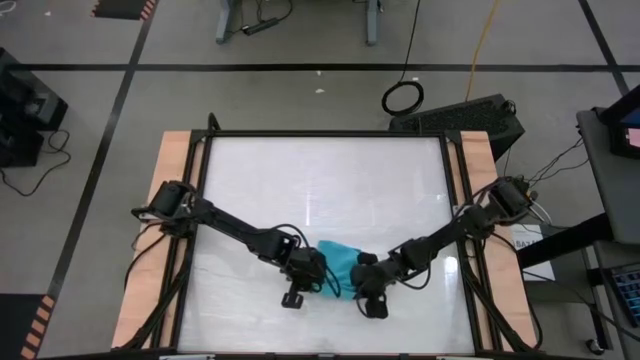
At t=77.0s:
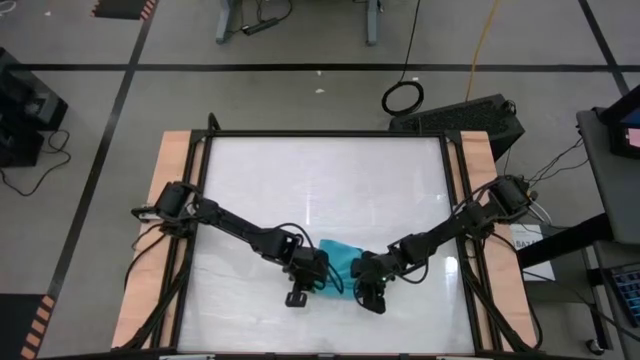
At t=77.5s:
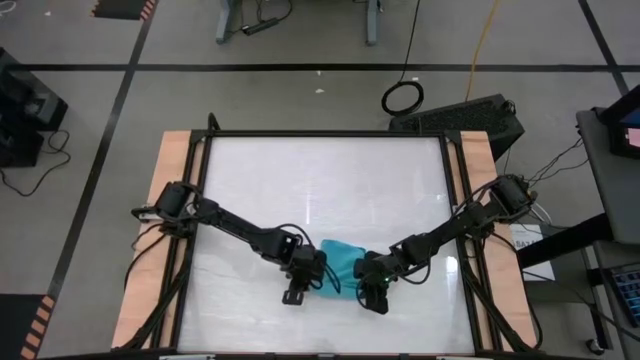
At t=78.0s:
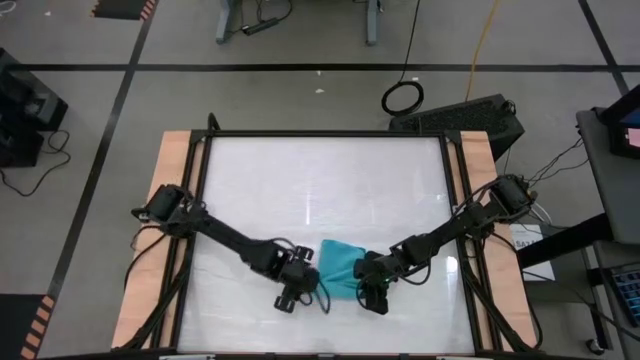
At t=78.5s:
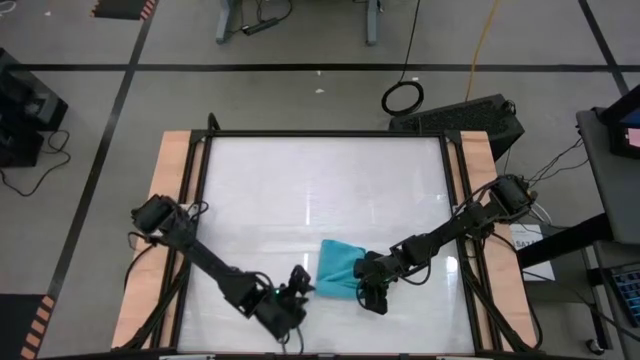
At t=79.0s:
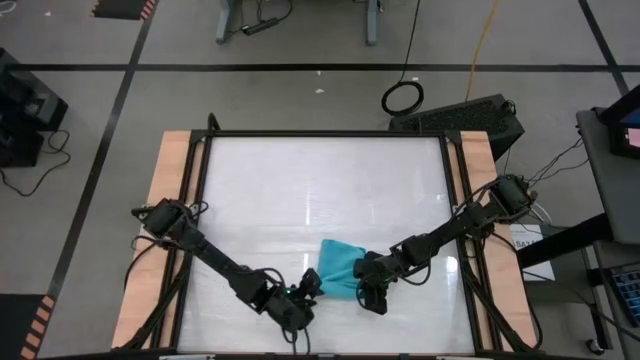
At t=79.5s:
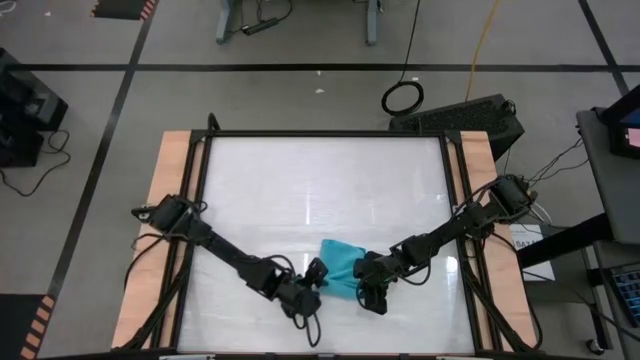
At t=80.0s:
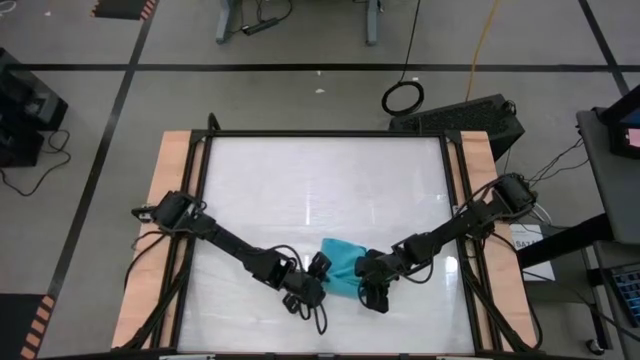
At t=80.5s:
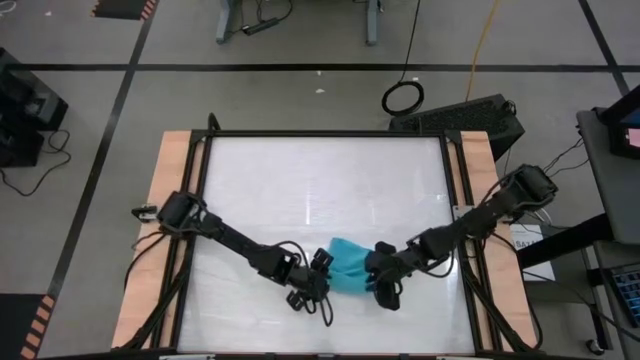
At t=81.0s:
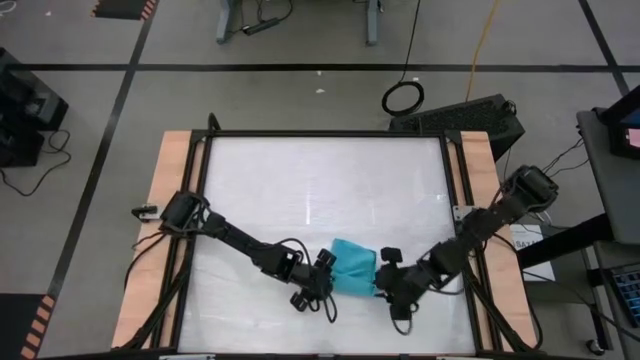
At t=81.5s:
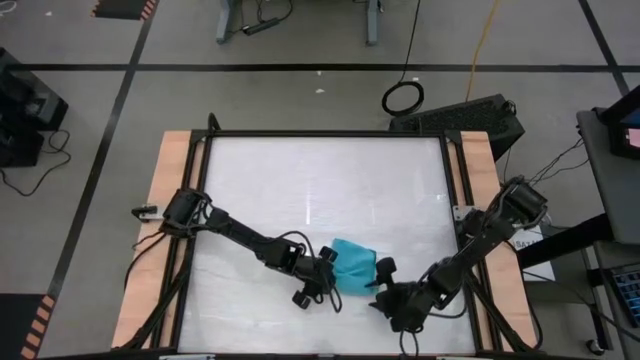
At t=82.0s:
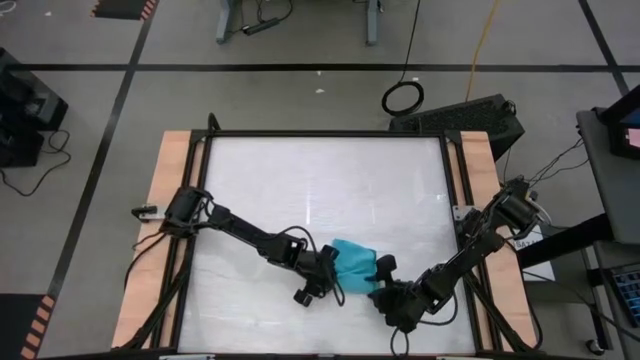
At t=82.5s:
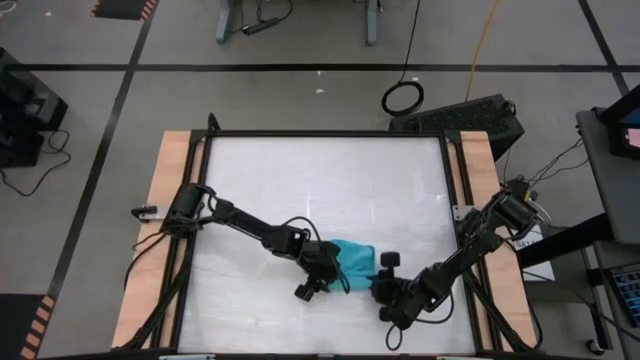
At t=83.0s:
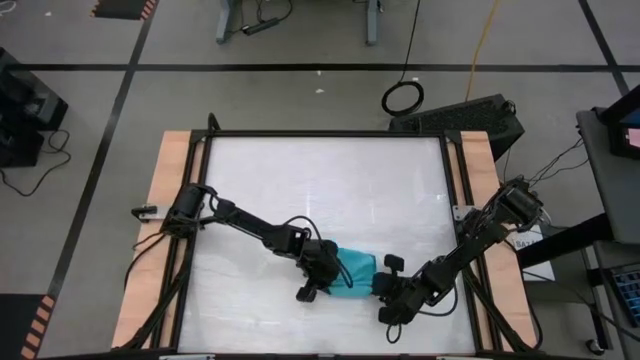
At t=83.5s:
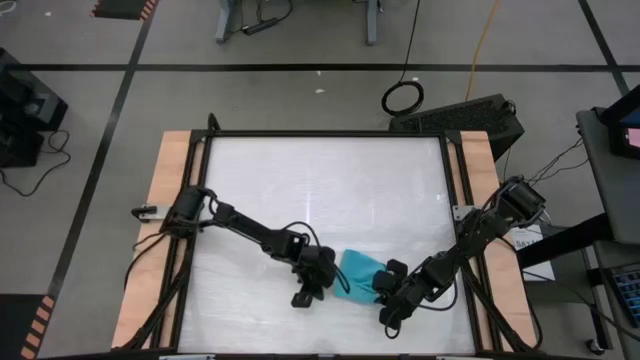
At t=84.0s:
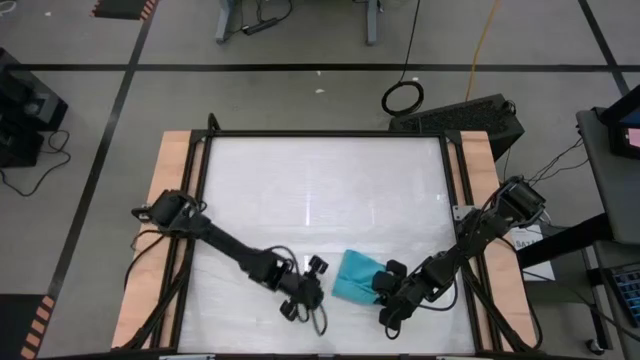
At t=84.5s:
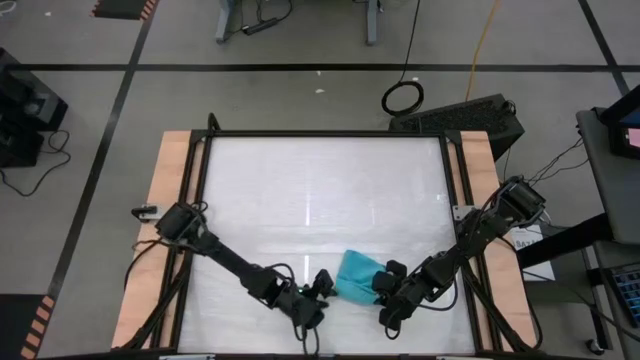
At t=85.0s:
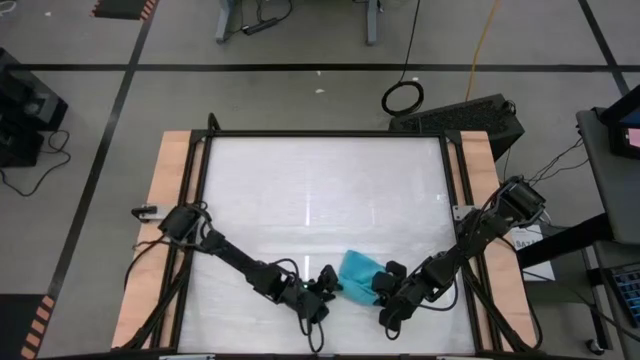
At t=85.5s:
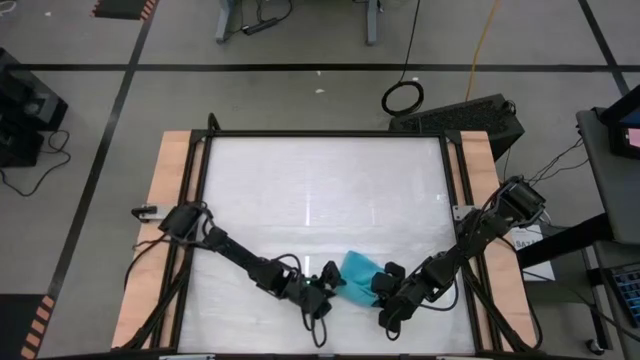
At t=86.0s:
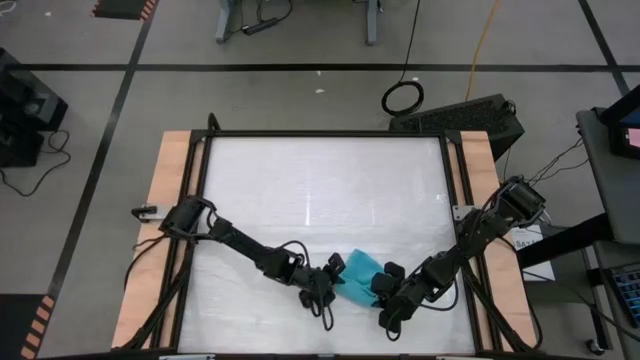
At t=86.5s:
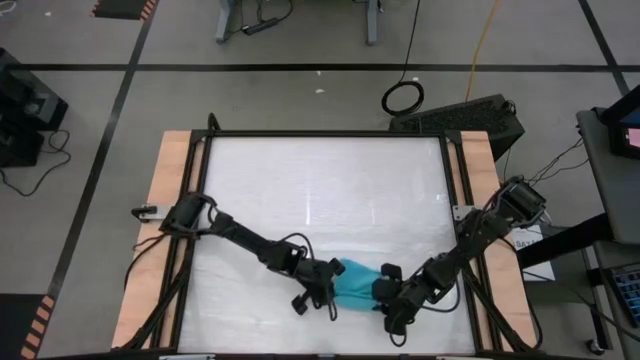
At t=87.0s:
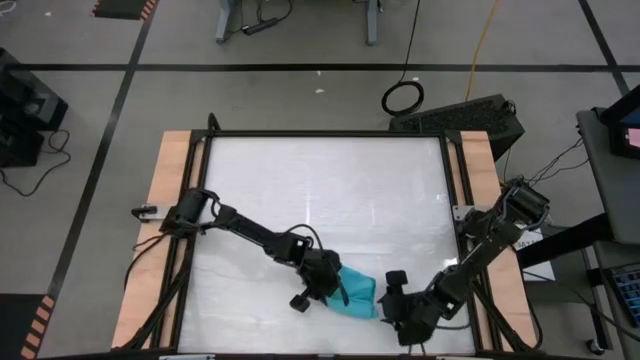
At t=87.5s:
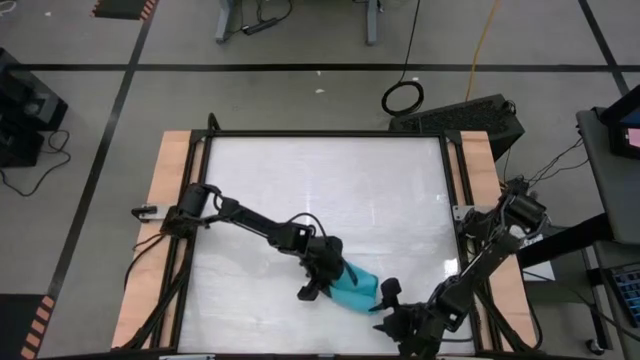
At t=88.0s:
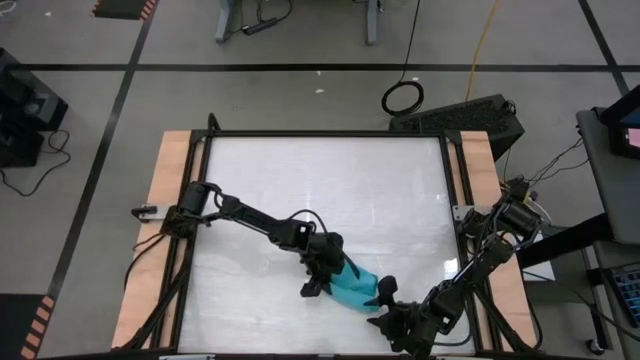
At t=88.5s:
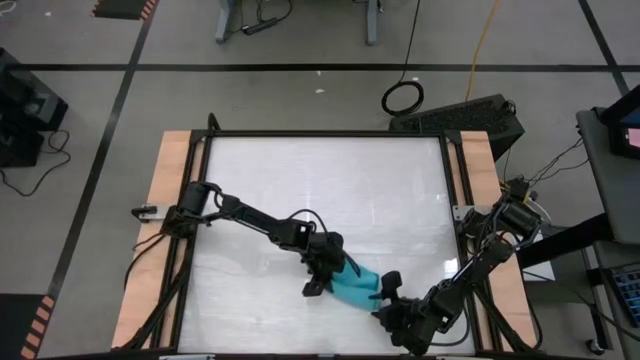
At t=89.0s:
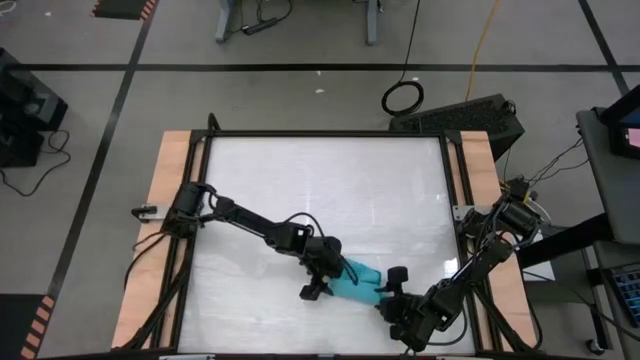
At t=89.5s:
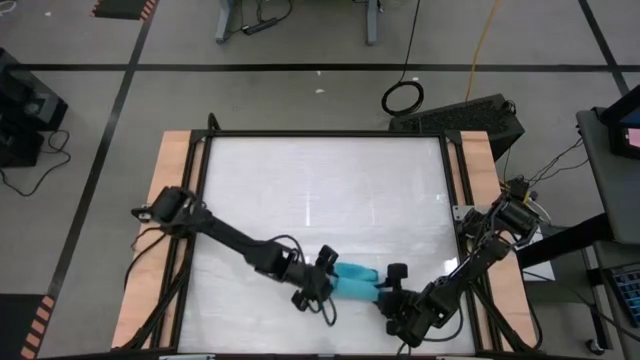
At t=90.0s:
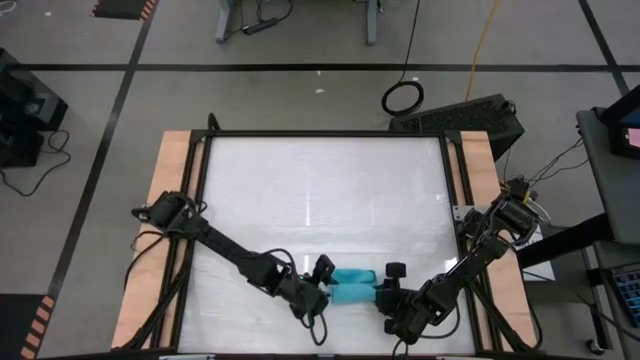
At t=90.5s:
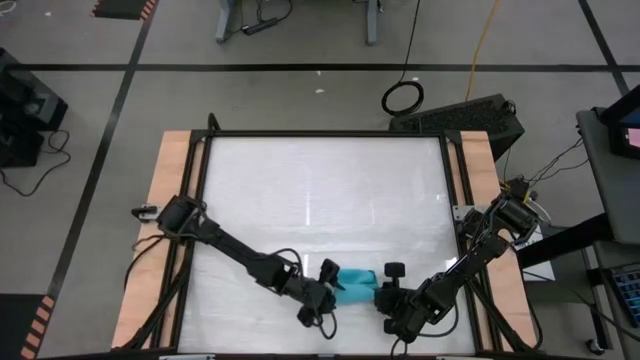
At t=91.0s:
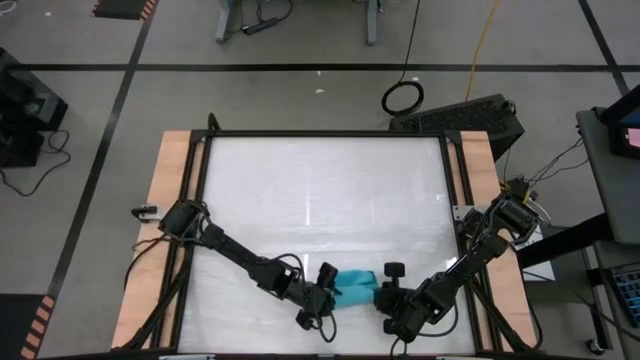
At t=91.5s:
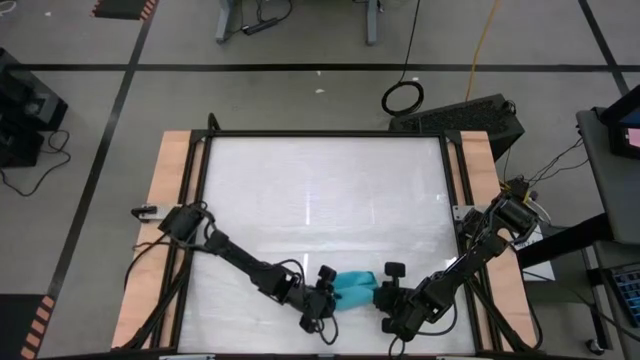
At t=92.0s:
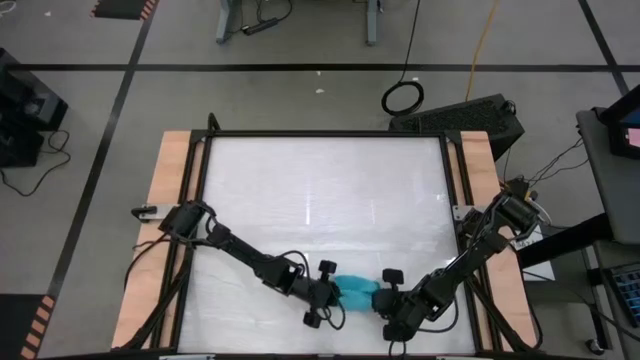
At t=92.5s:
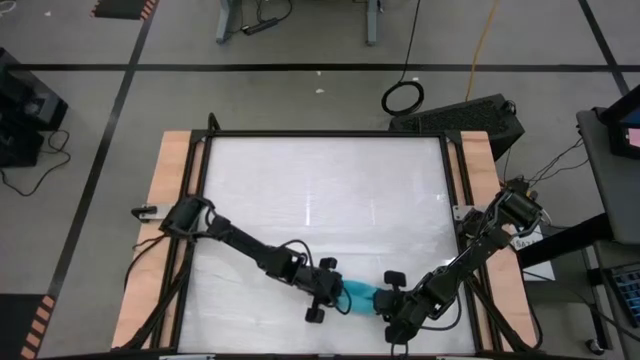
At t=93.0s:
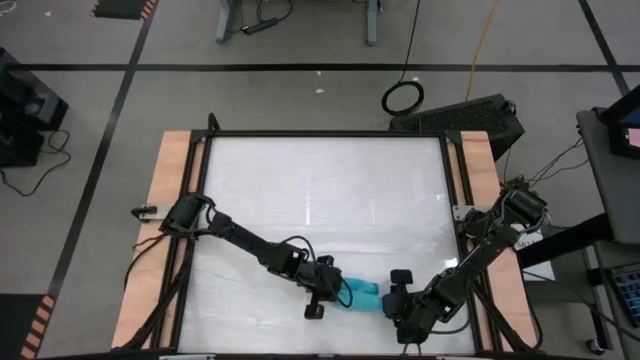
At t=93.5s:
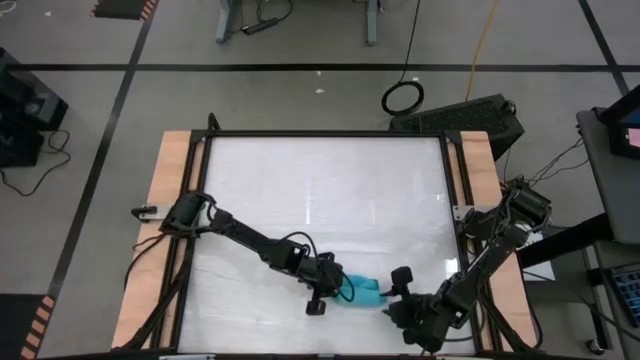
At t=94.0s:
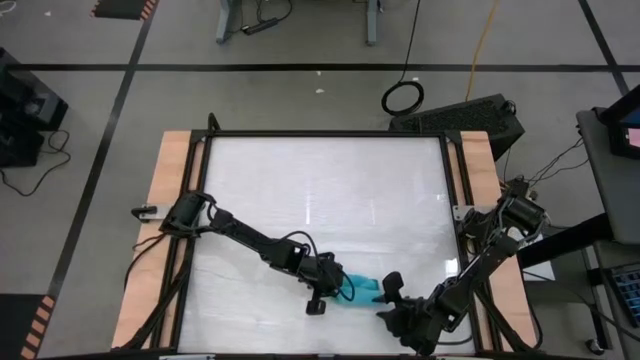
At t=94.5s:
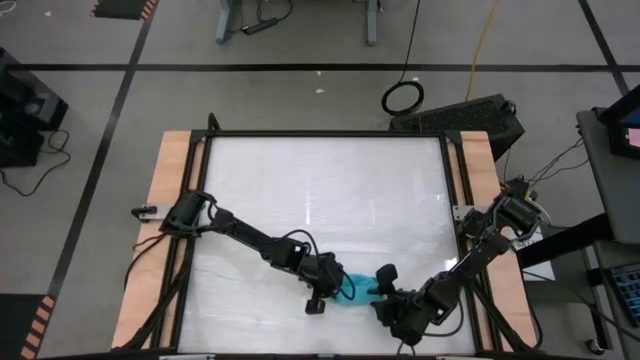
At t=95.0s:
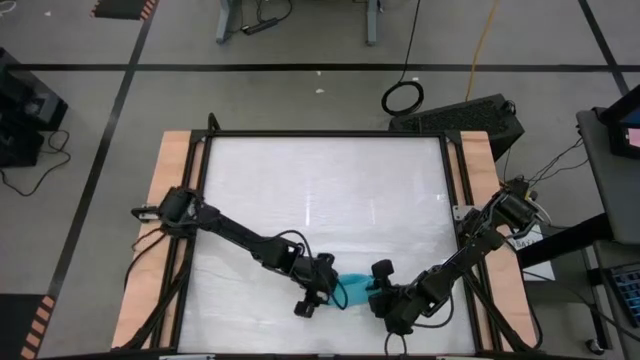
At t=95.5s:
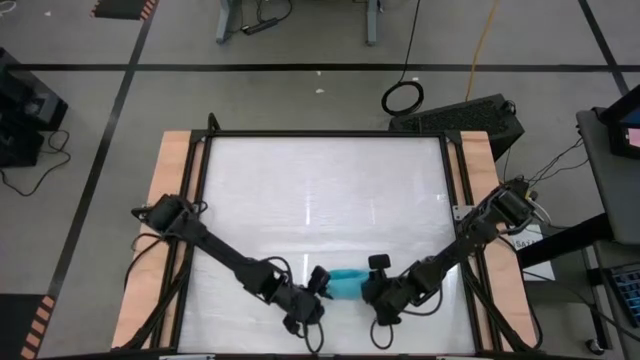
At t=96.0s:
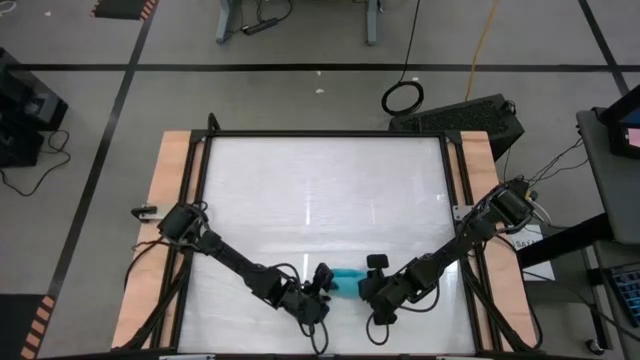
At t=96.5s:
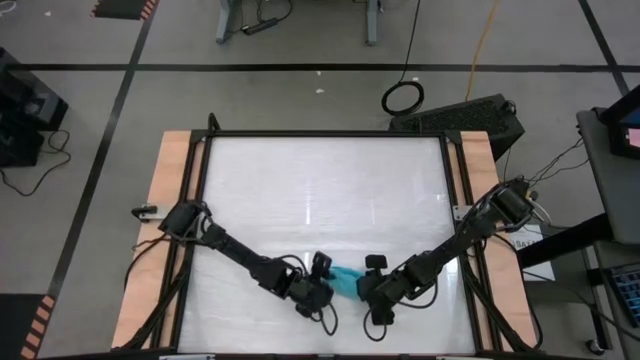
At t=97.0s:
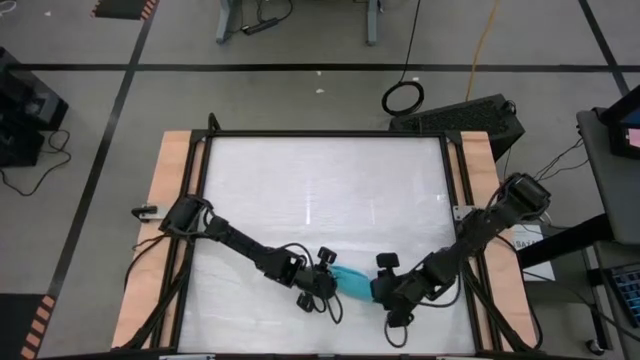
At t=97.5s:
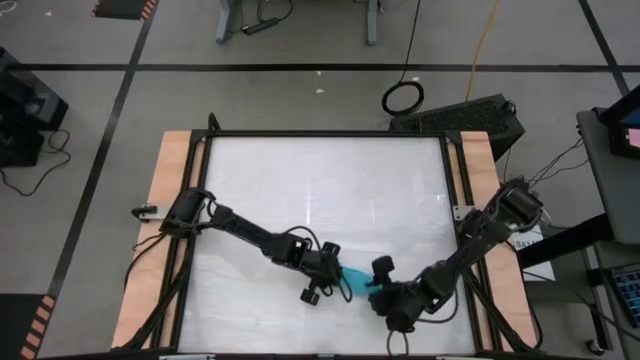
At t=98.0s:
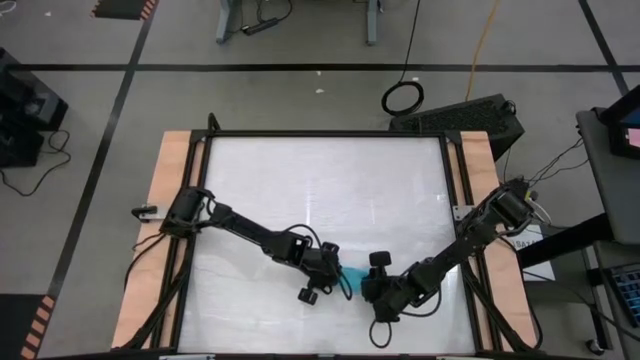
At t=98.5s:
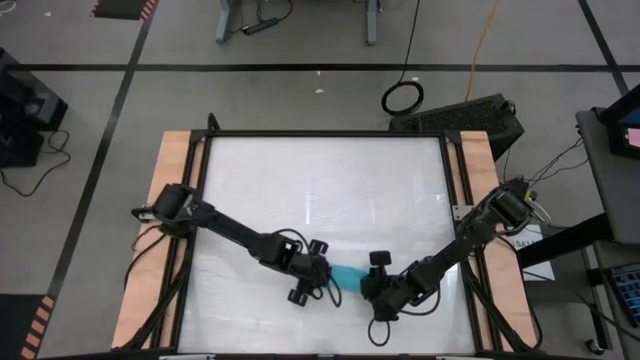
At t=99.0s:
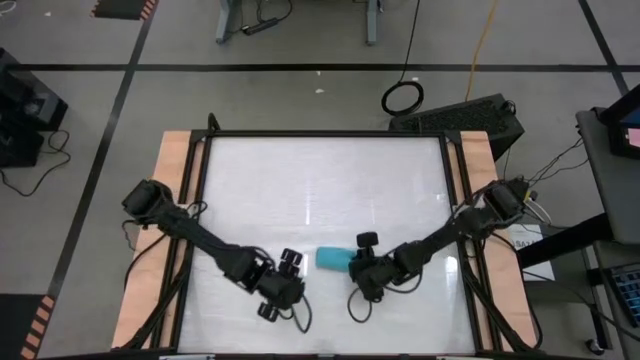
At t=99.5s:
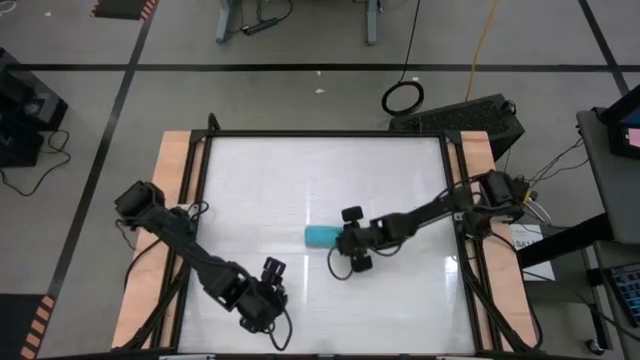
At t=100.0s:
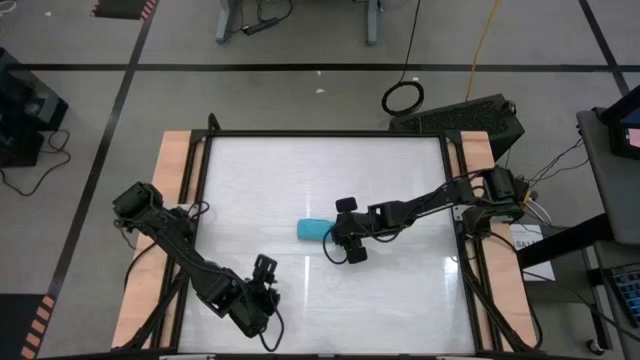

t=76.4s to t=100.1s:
Task: Roll towel into tight, uniform cylinder
Roll the blue microfiber towel
